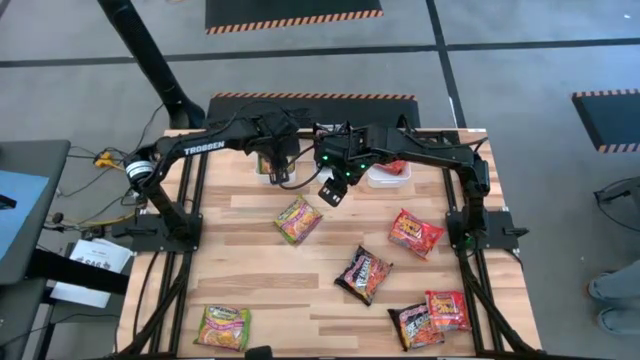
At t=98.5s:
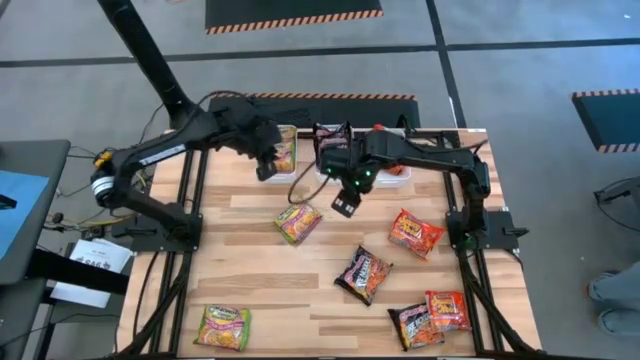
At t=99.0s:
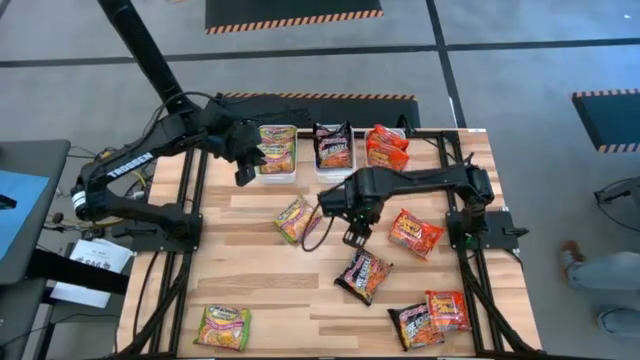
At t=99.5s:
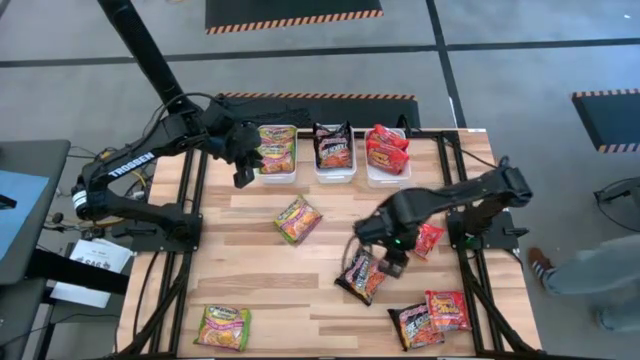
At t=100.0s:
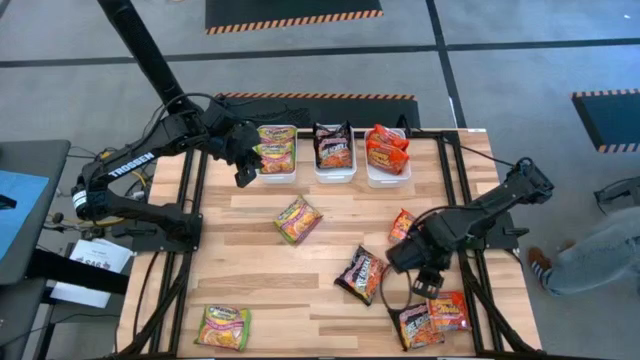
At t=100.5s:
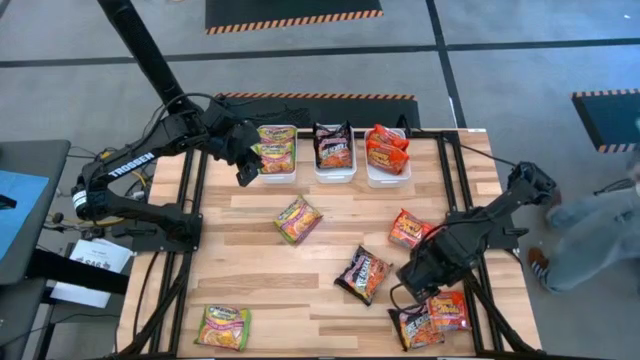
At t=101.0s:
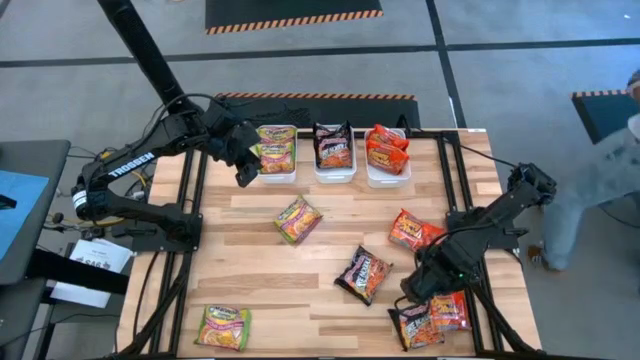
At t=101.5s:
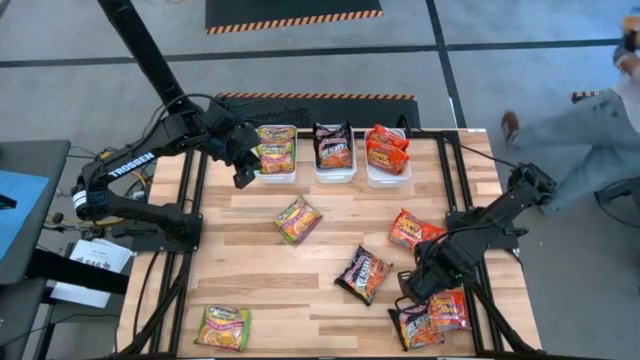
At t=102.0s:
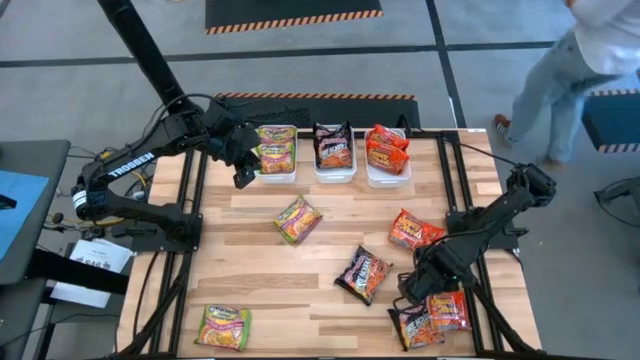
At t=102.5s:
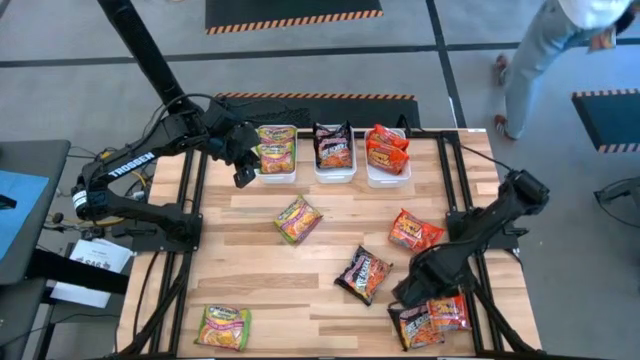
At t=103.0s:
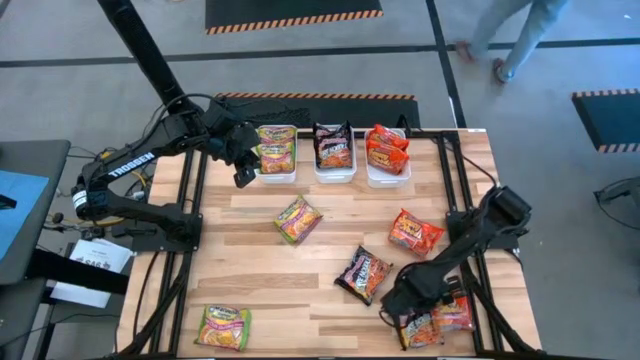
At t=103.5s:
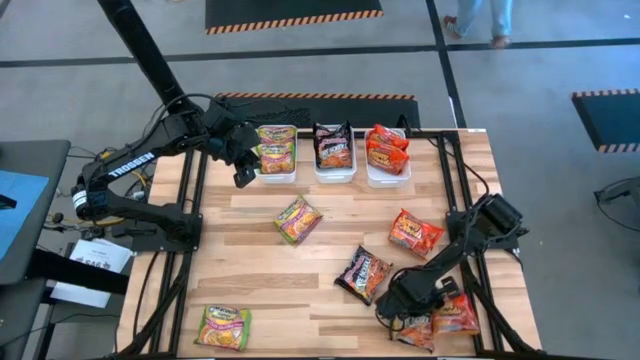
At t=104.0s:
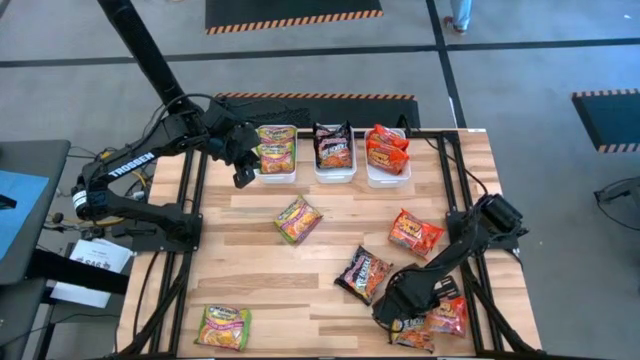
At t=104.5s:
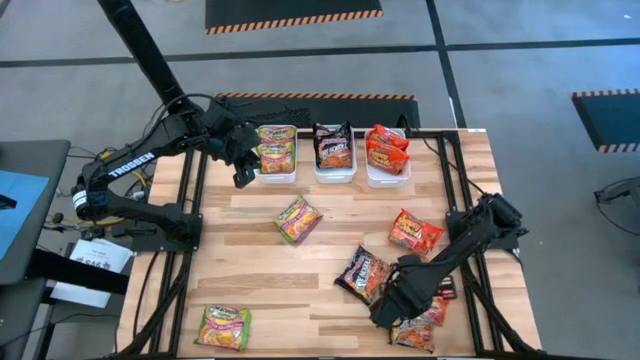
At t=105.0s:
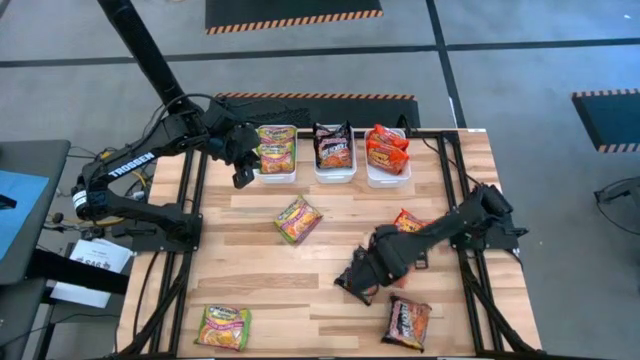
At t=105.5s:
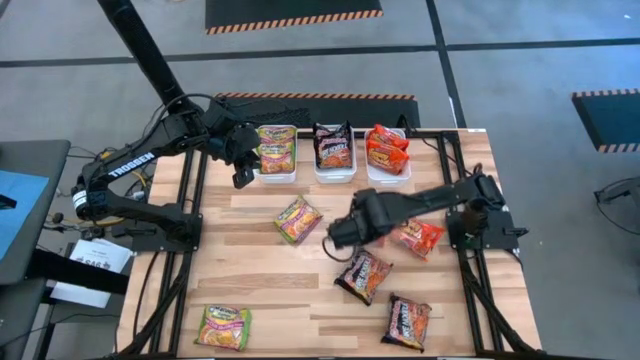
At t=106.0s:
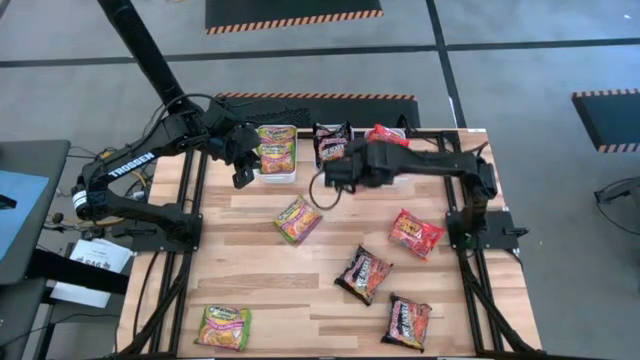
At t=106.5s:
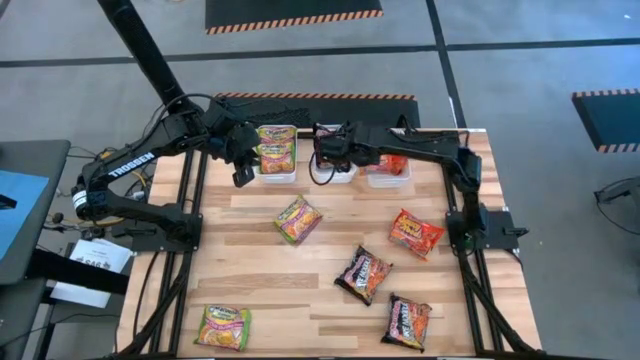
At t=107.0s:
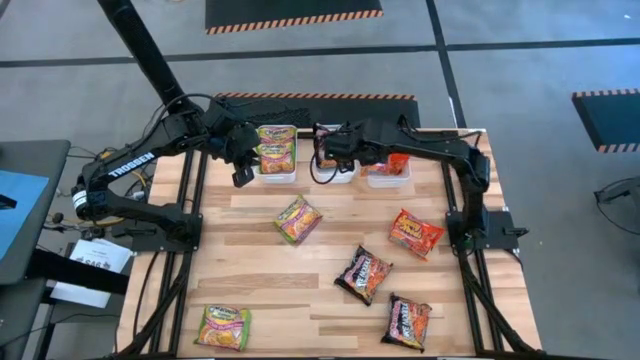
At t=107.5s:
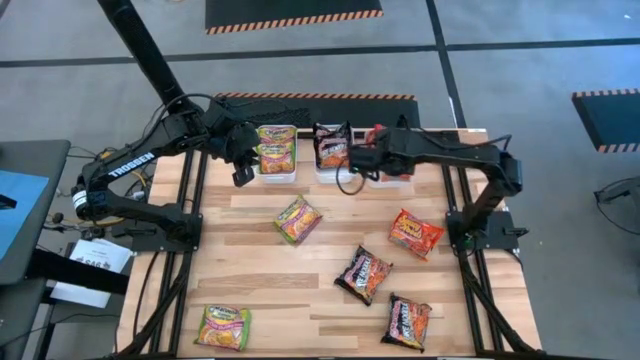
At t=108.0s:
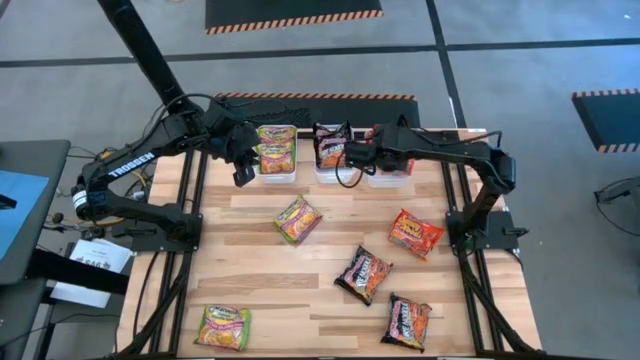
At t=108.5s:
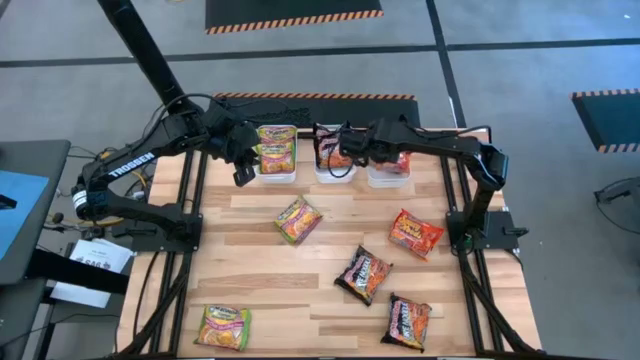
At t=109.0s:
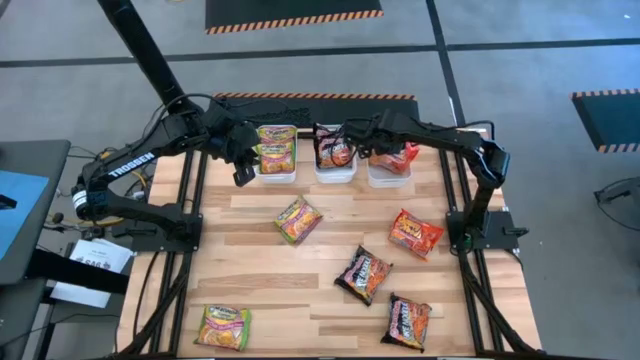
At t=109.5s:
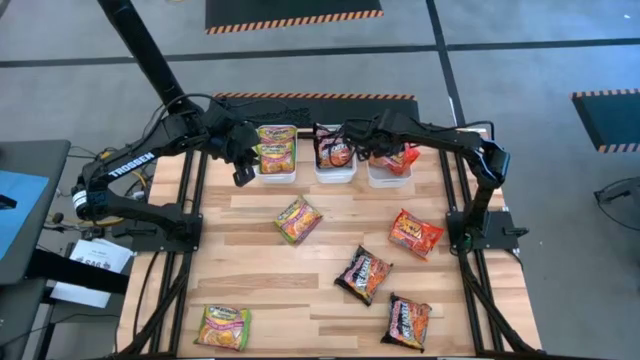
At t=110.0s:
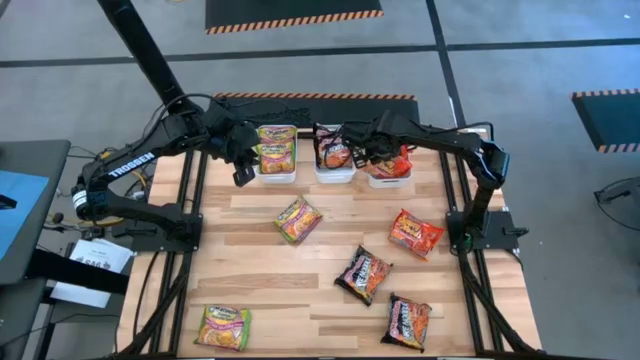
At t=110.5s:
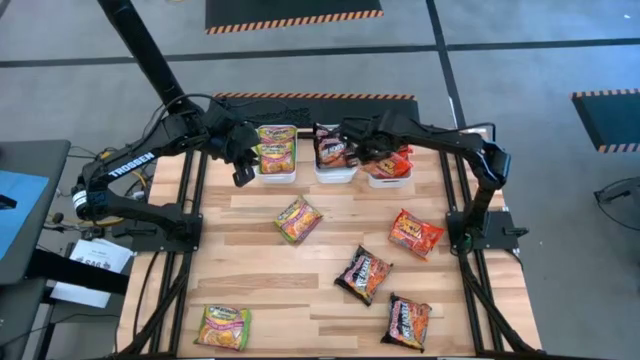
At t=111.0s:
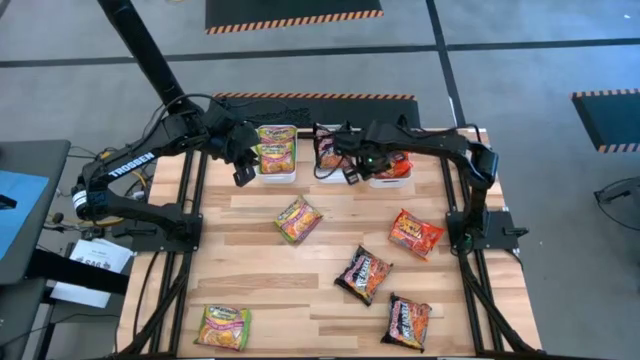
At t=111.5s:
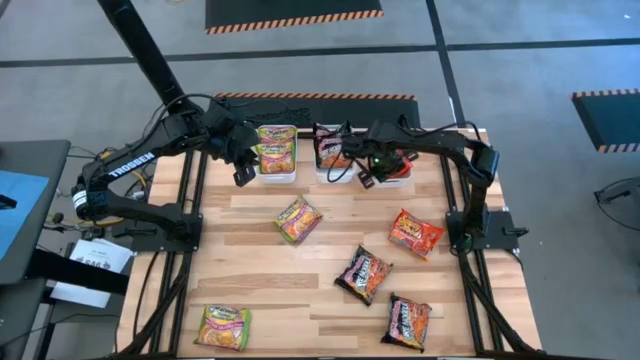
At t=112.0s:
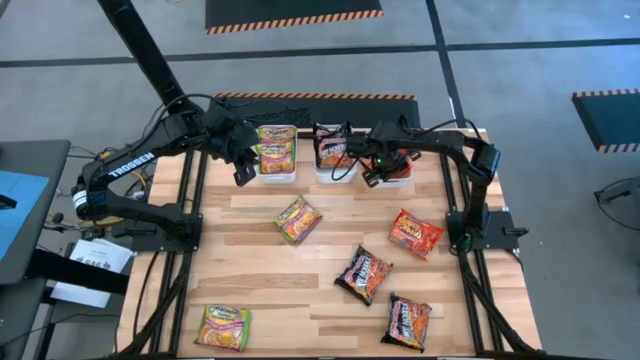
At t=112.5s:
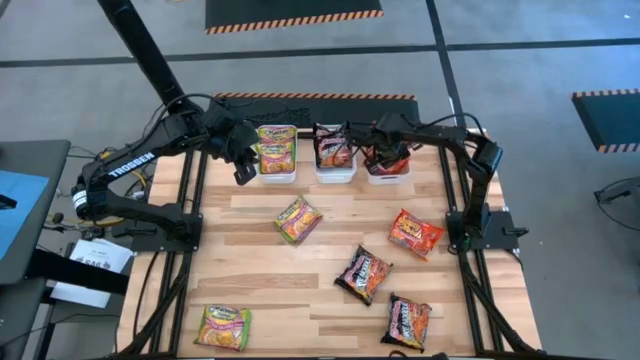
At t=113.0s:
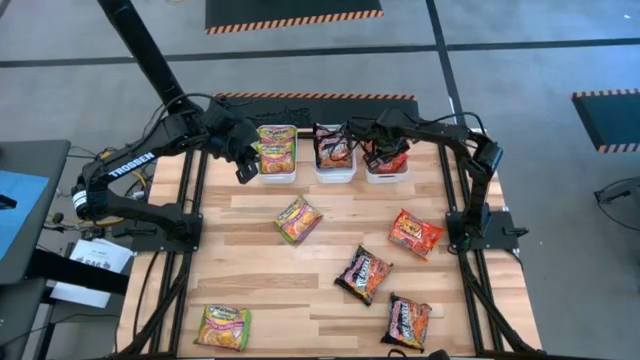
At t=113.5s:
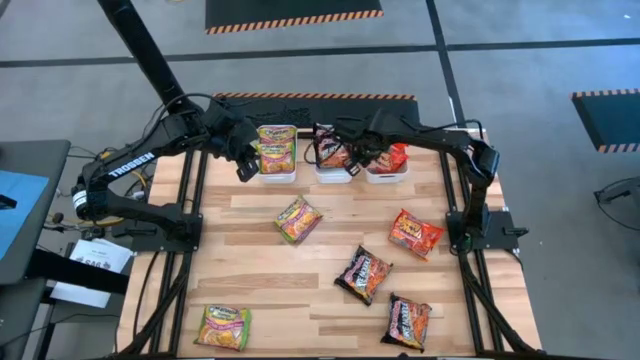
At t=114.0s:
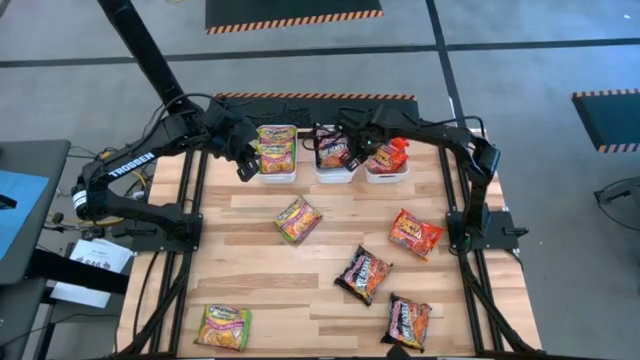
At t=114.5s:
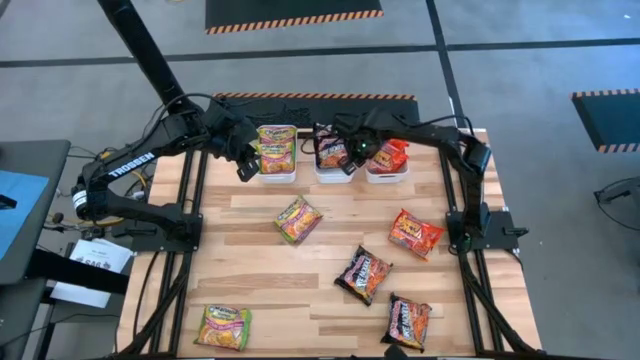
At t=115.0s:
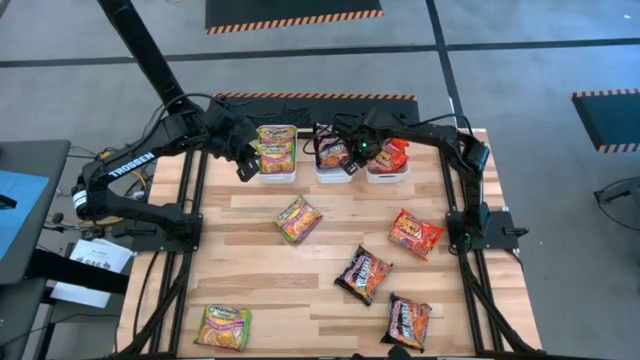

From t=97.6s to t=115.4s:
Task: Sort Maruchan noodles
Put the orange noodle pack into the right white bin
